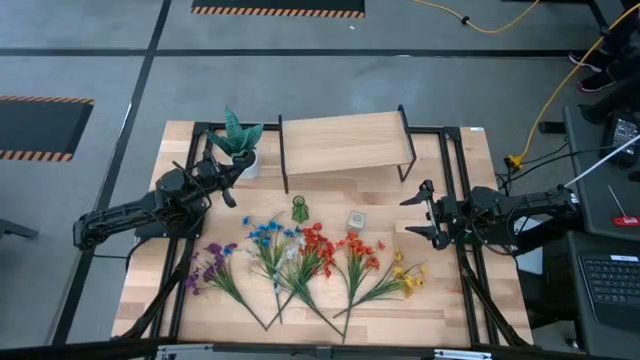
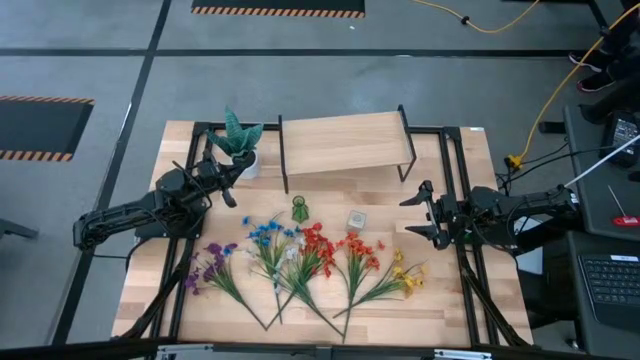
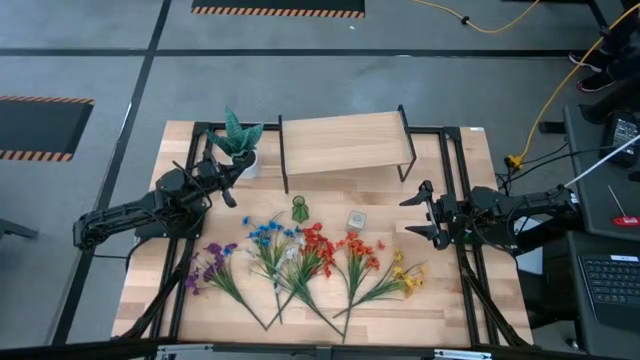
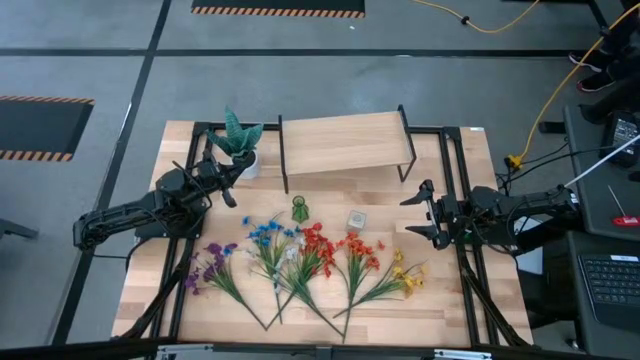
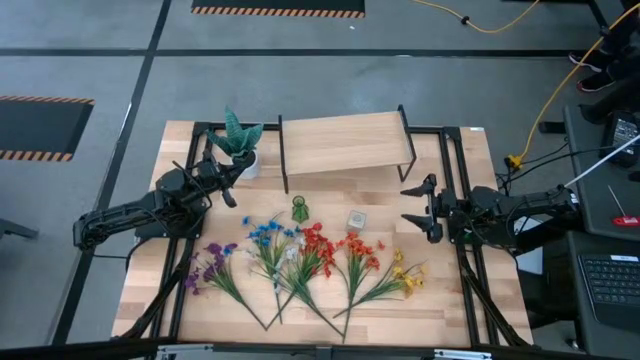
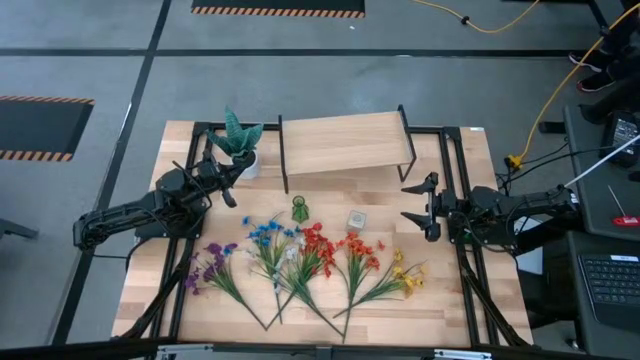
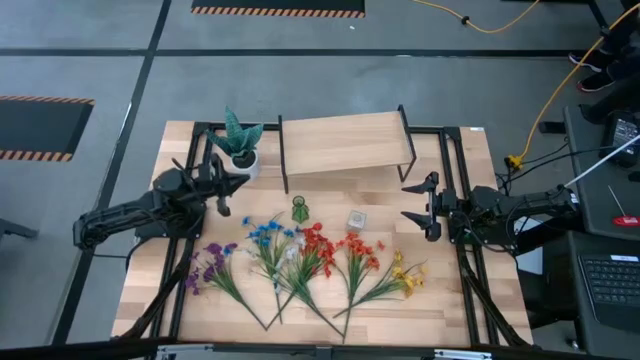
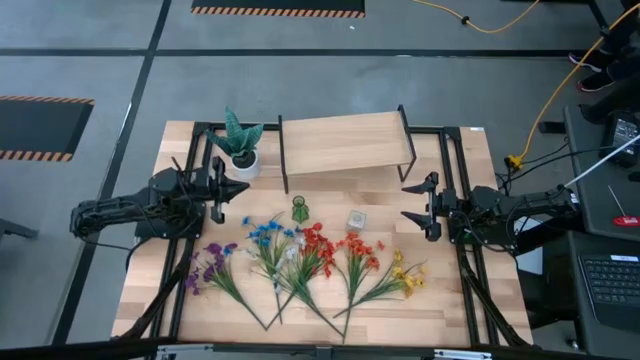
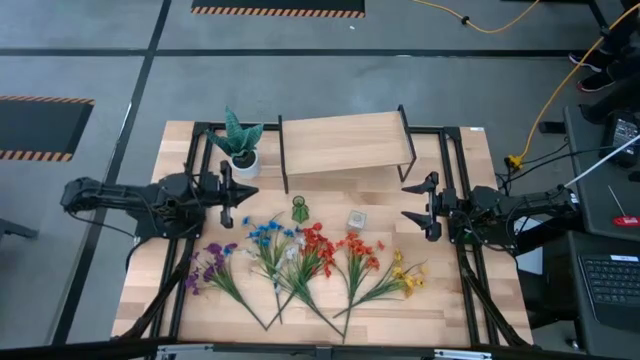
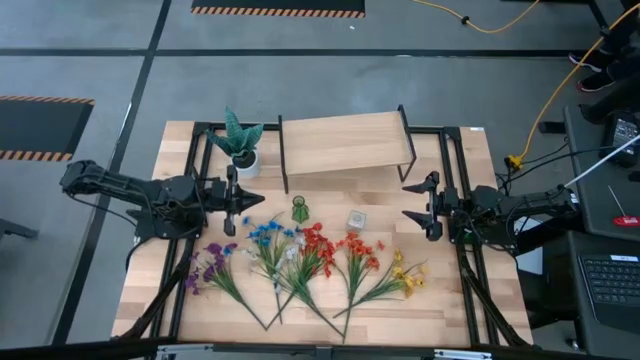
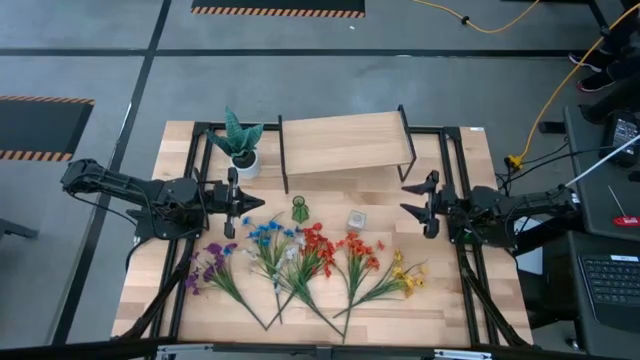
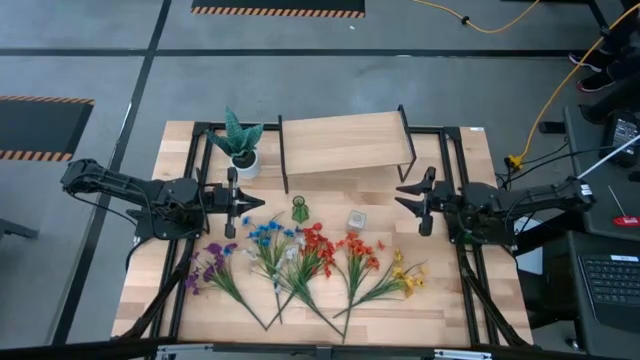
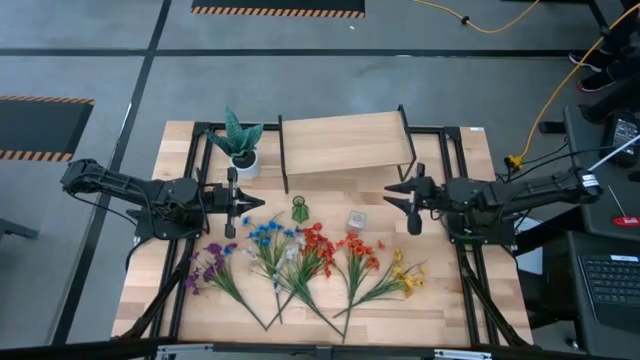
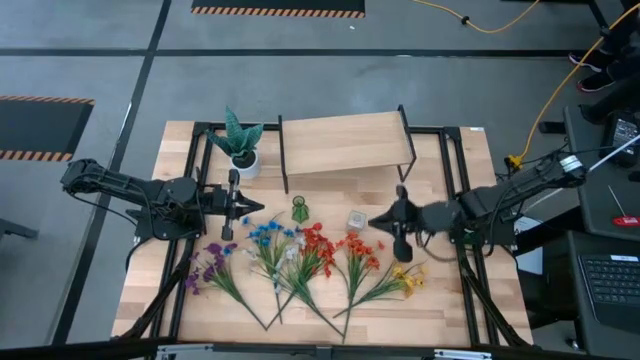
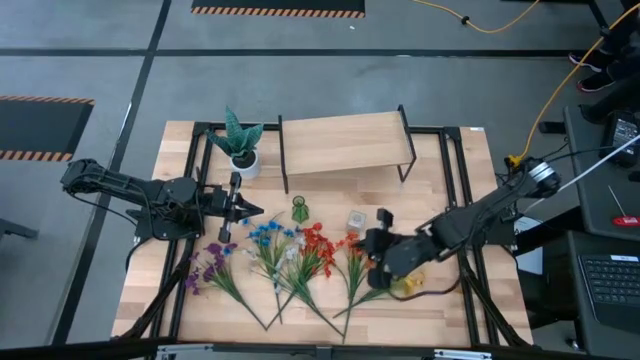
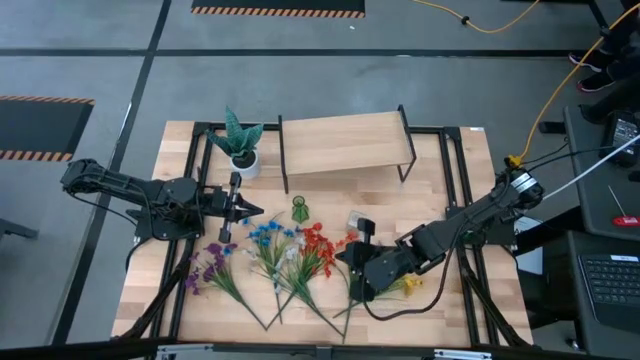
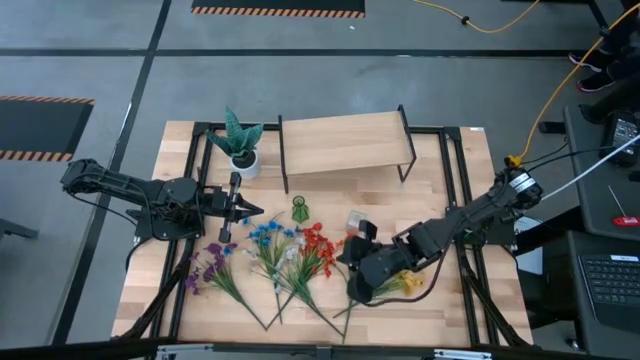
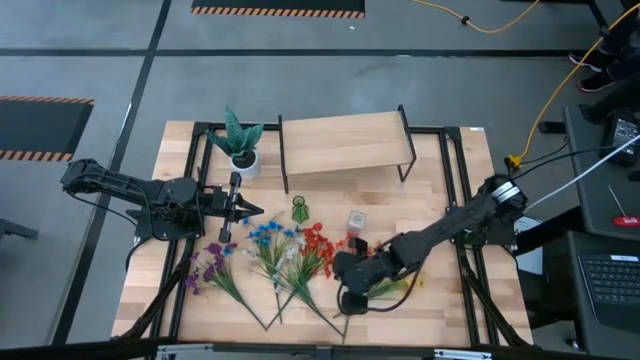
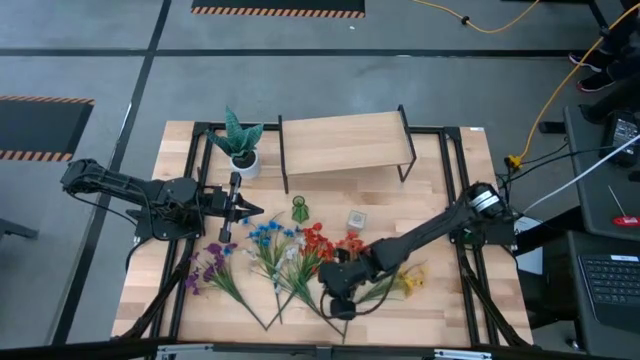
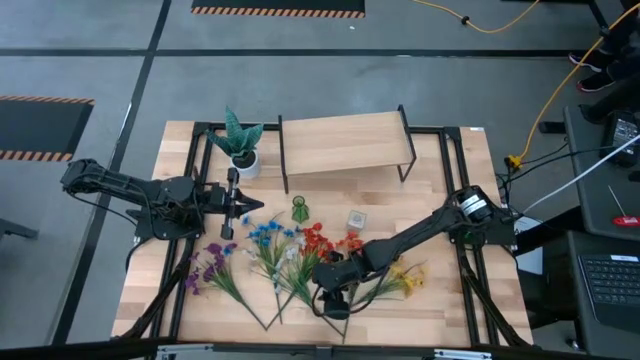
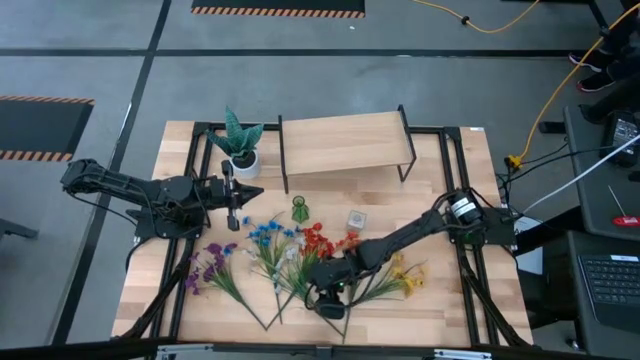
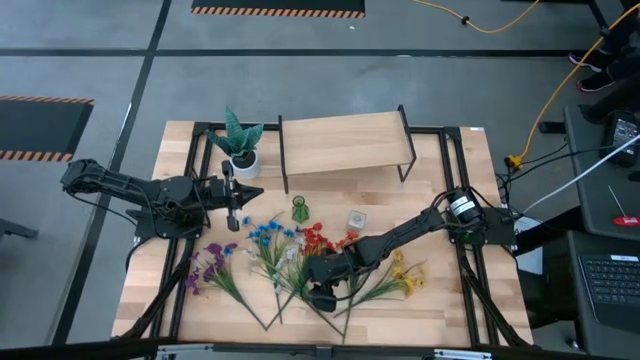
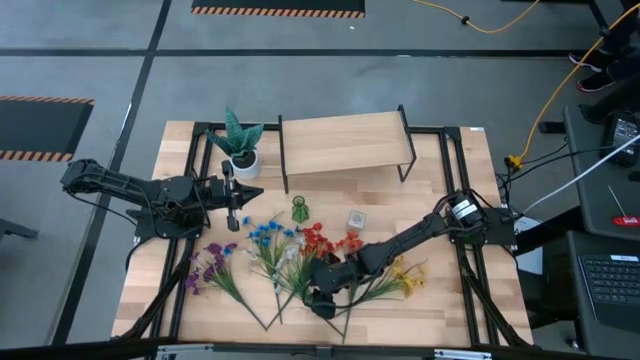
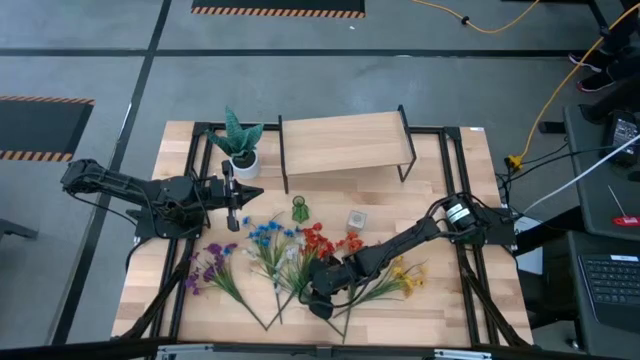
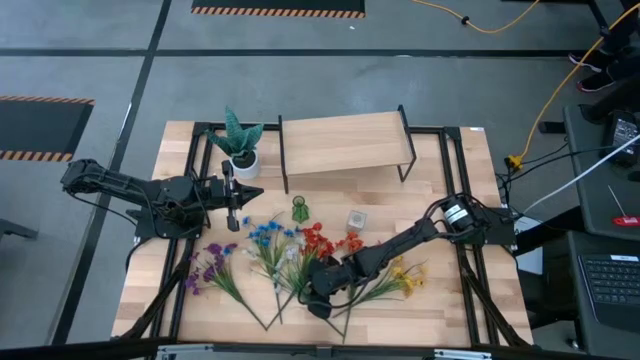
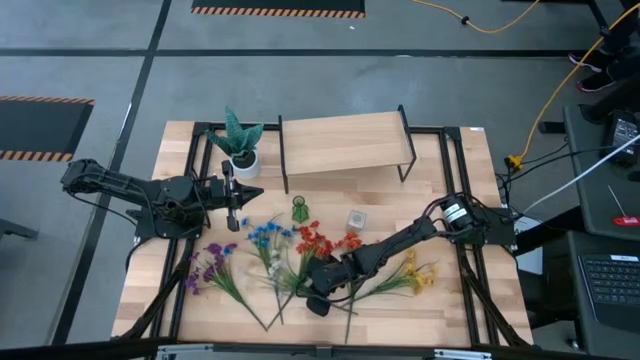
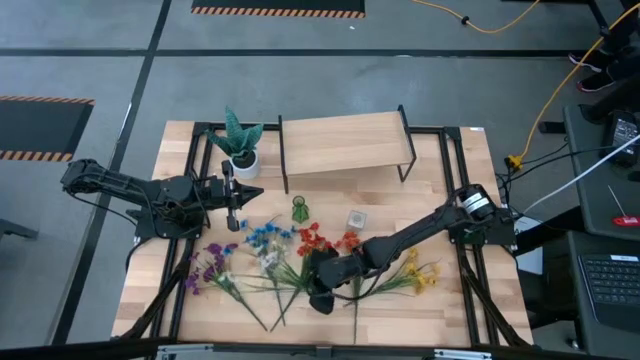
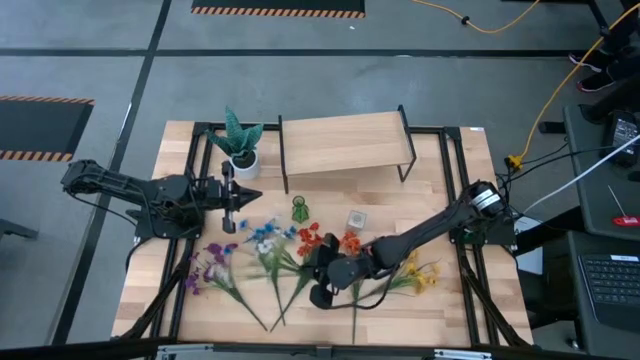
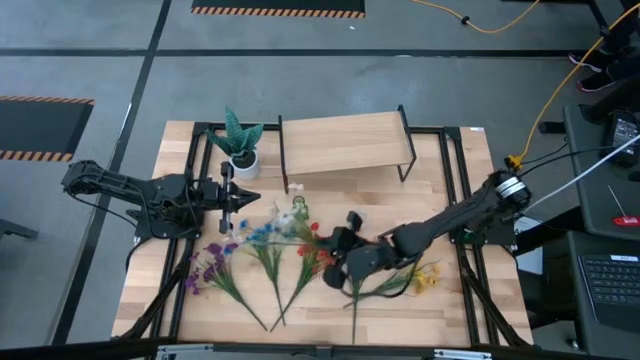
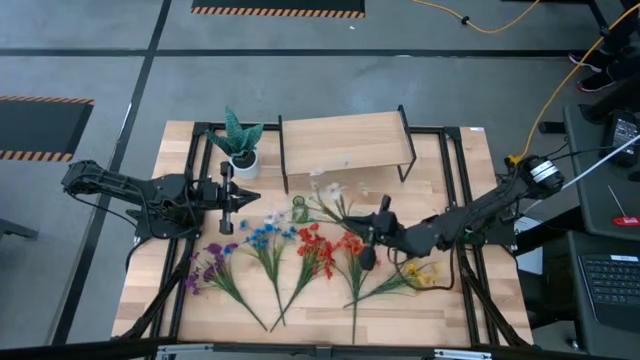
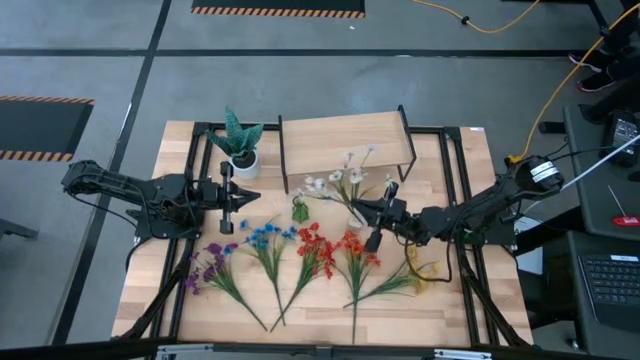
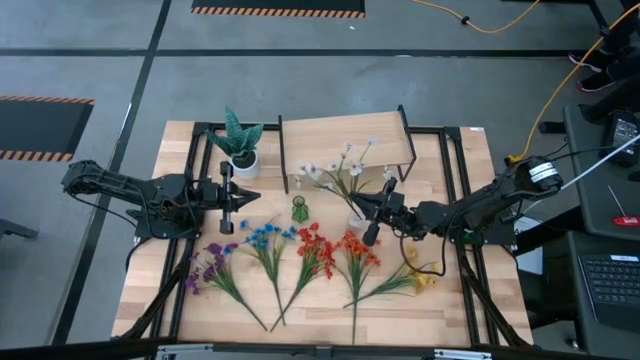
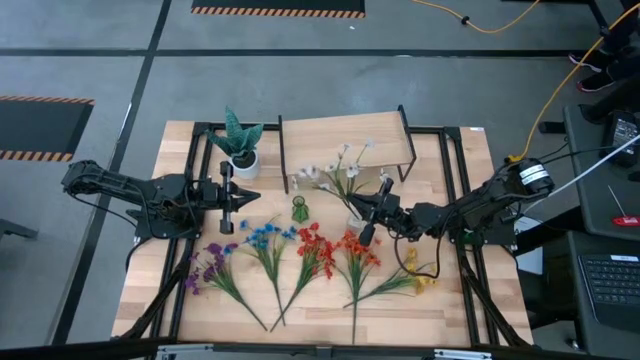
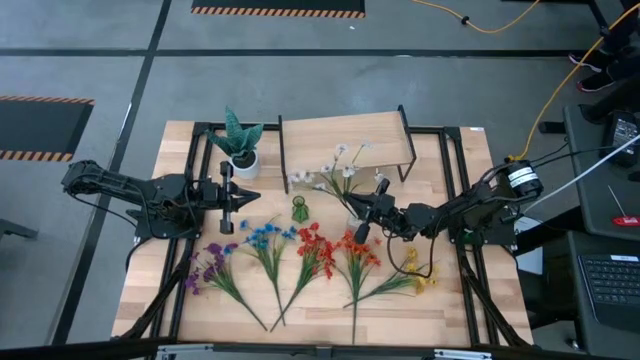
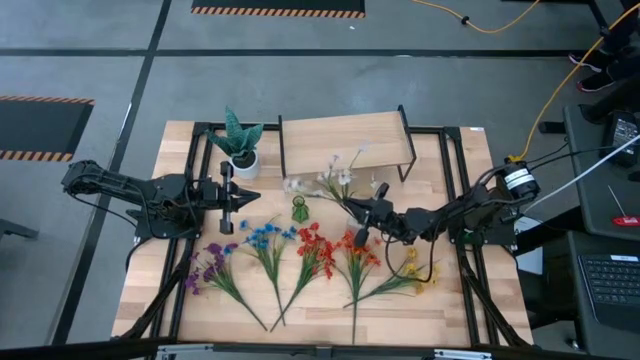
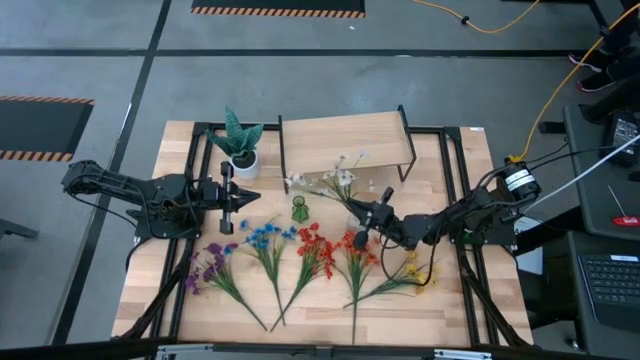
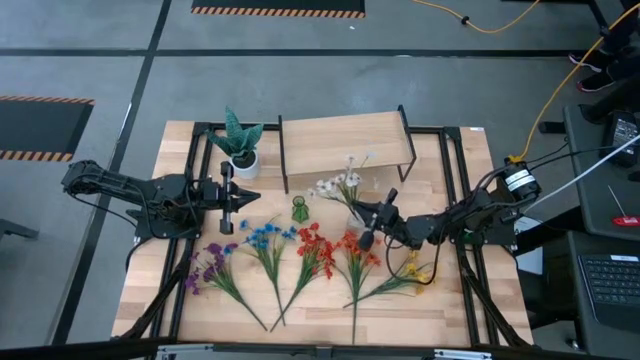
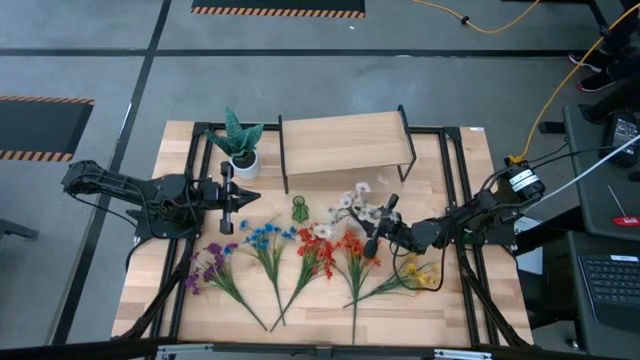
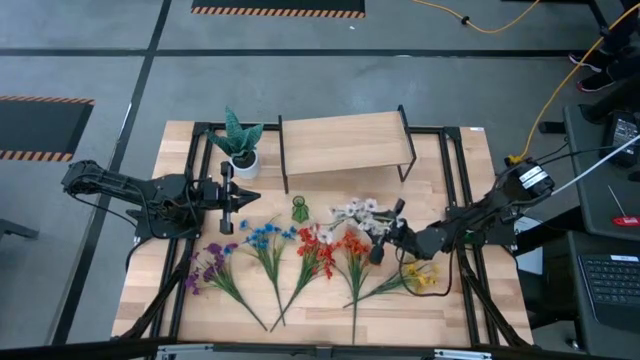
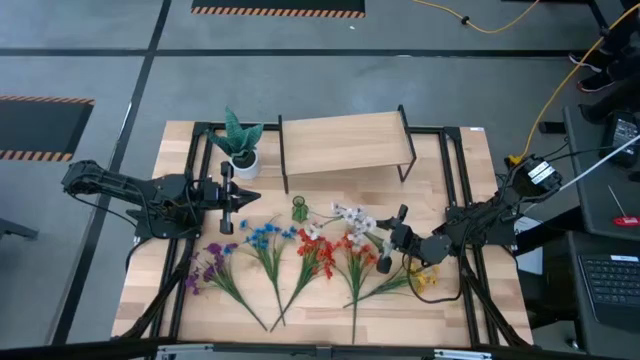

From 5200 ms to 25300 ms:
Task: Pick and place flowers into a vace then onto a shelf
Put the white flowers into the transparent vase
